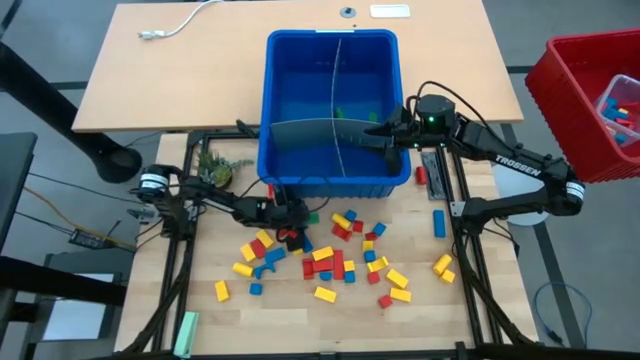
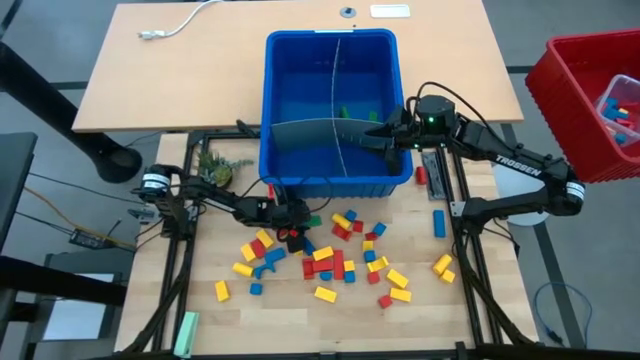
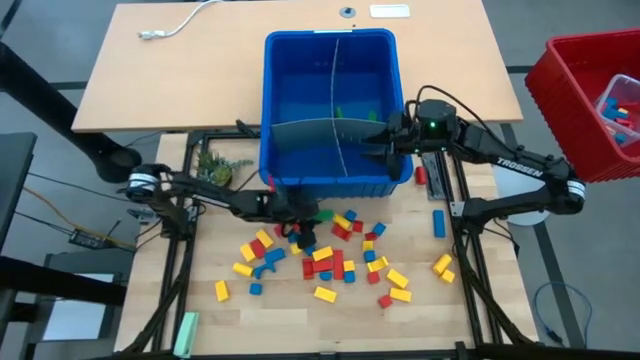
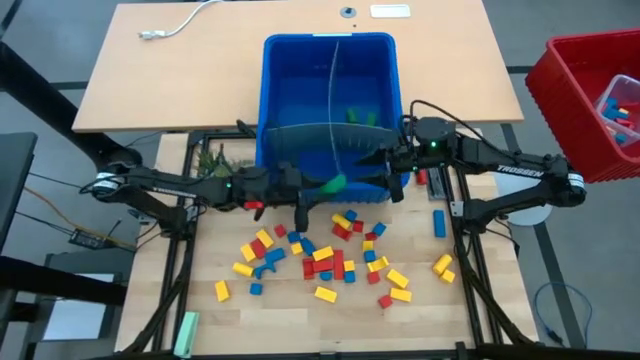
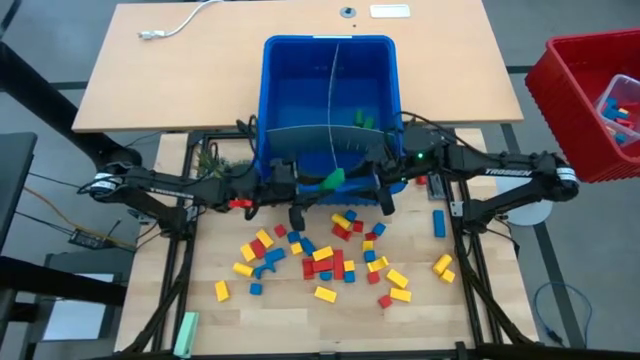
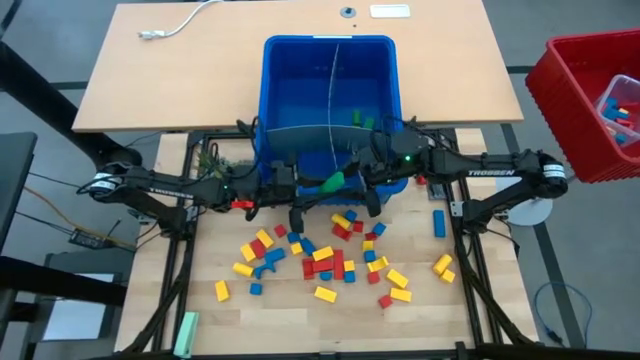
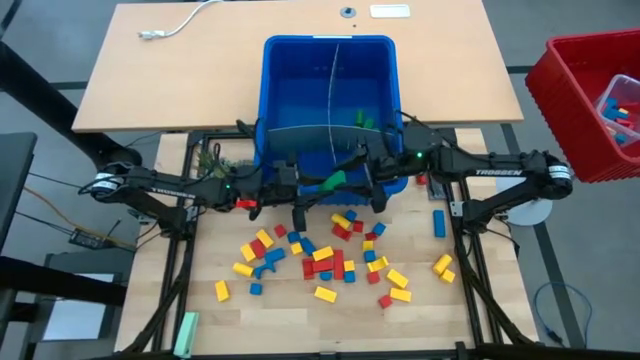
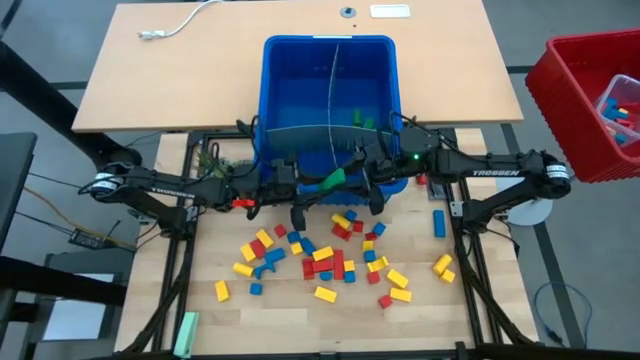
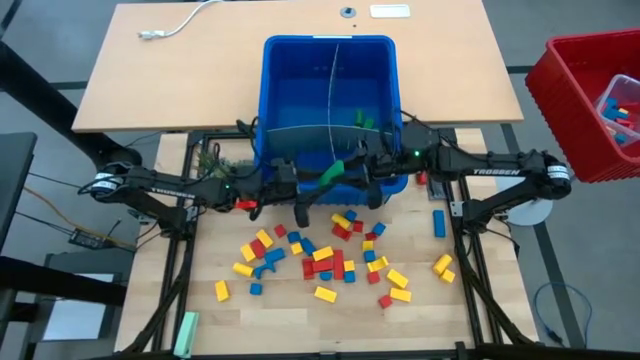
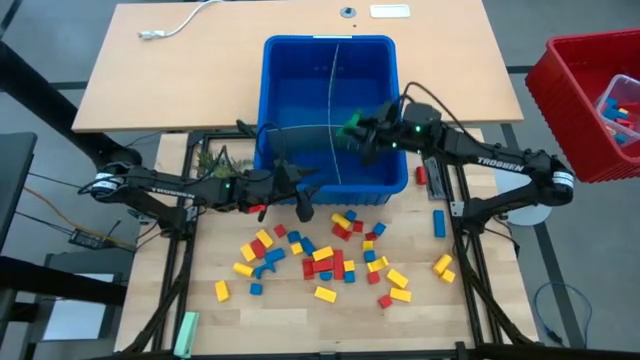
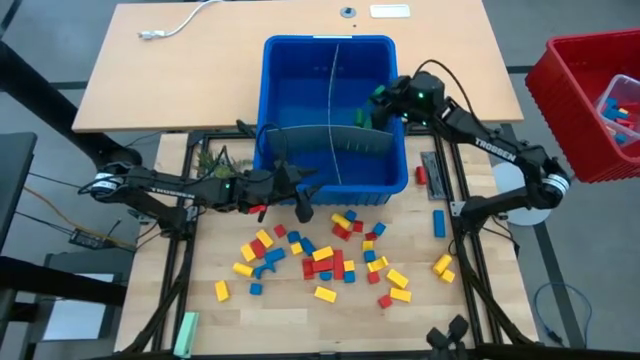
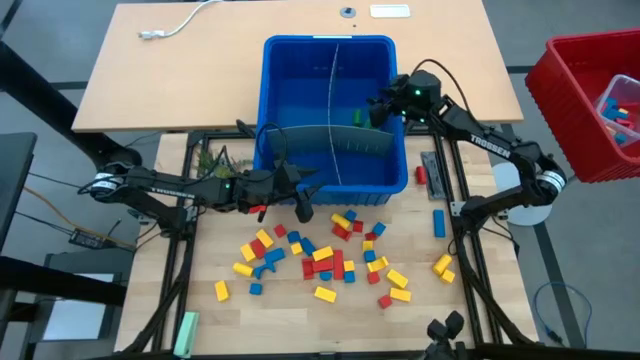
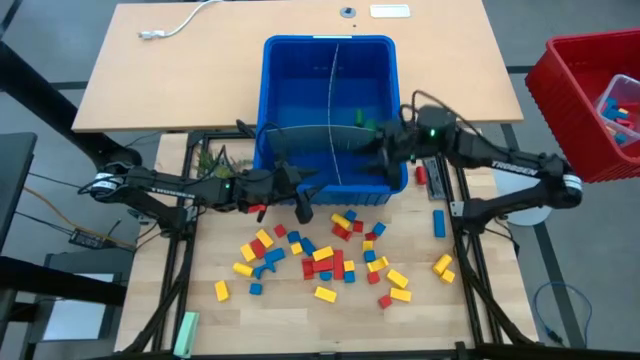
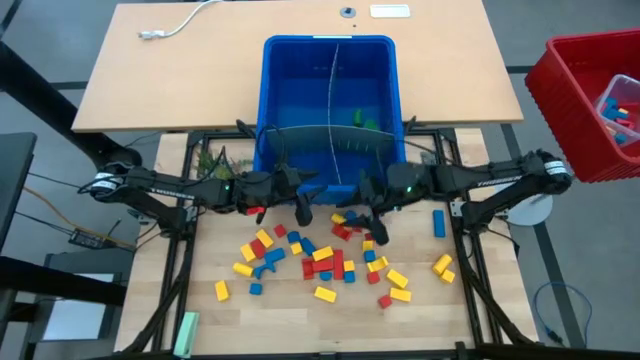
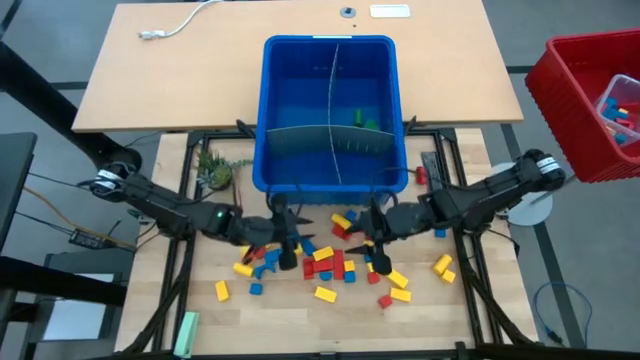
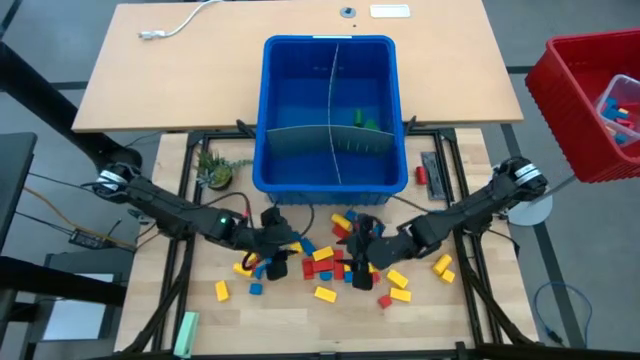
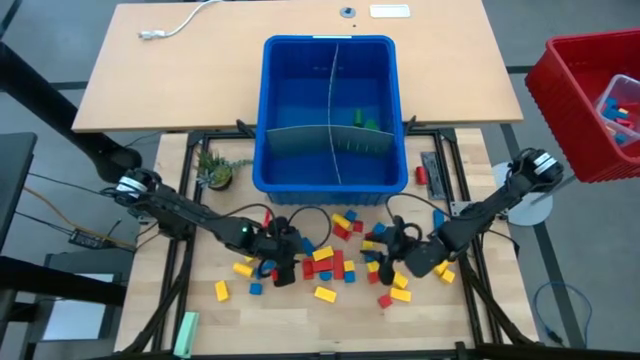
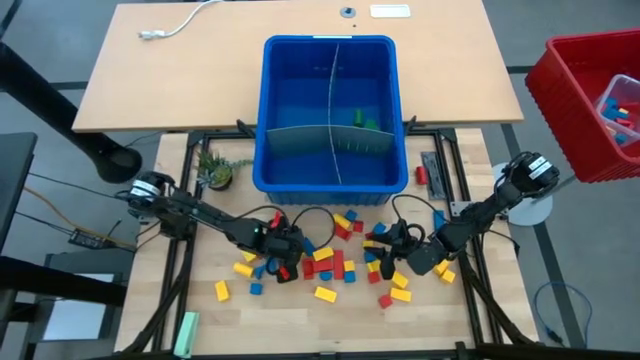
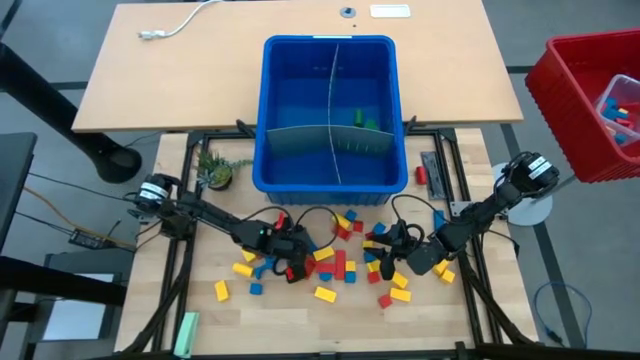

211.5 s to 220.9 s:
Task: Sort blocks
Put the green block with the other green blocks into the blue bin

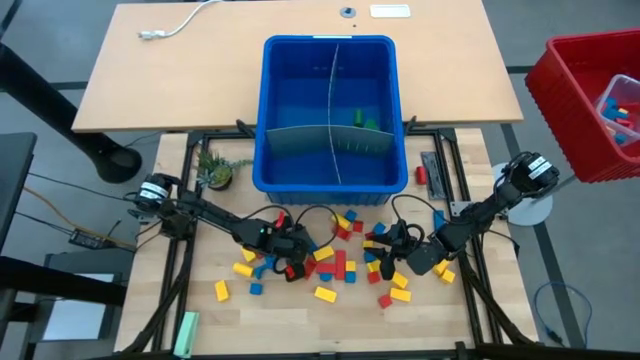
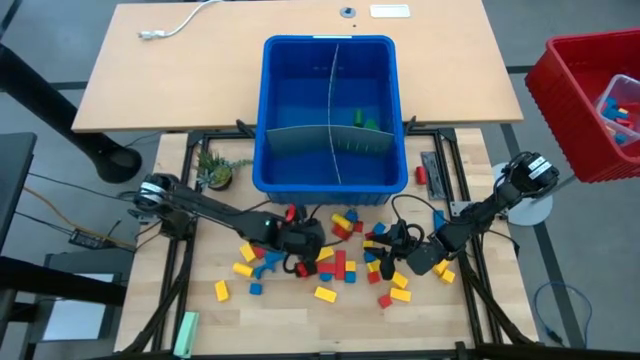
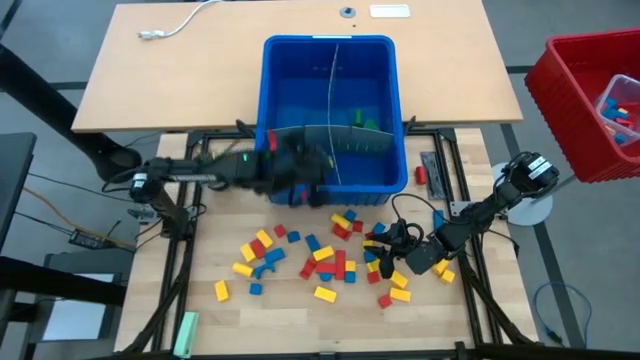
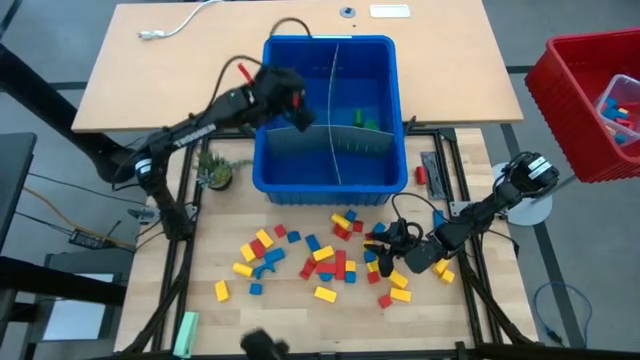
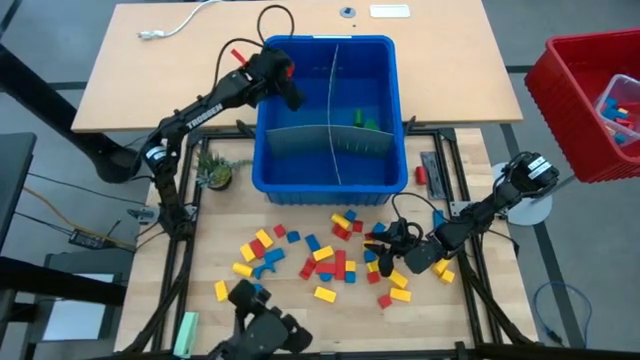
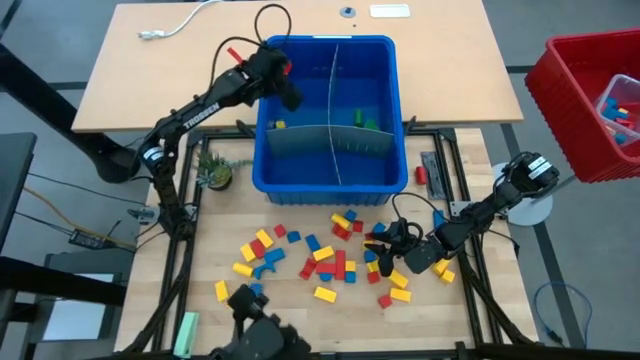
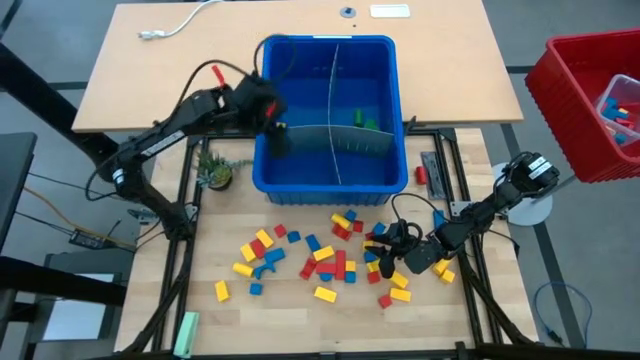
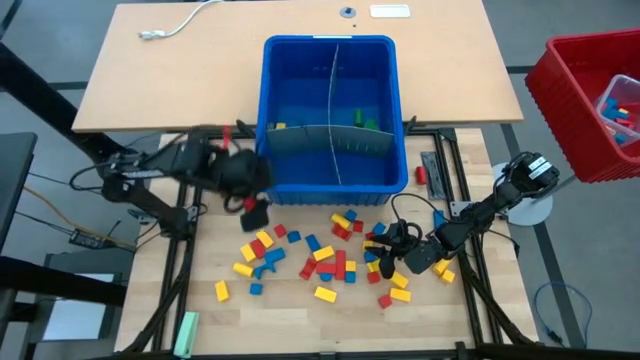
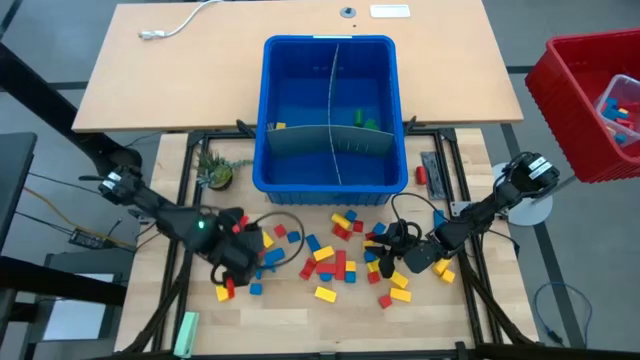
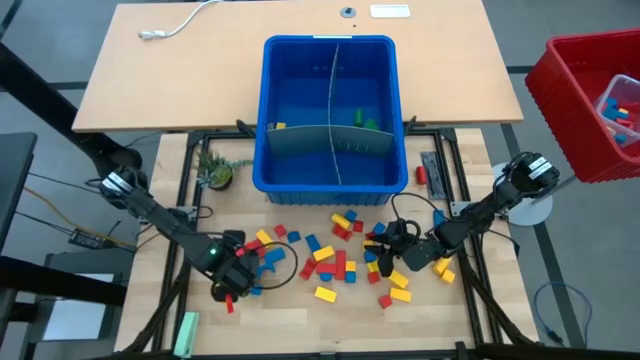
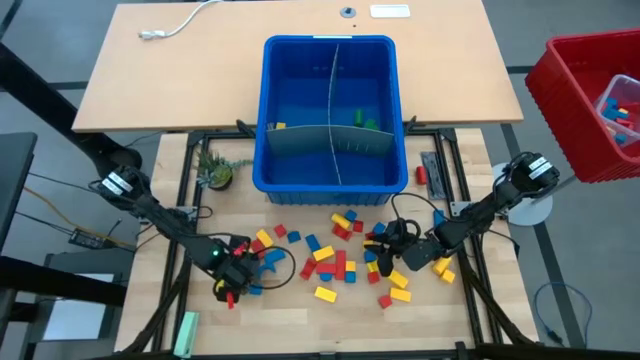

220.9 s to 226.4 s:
Put the green block with the other green blocks into the blue bin

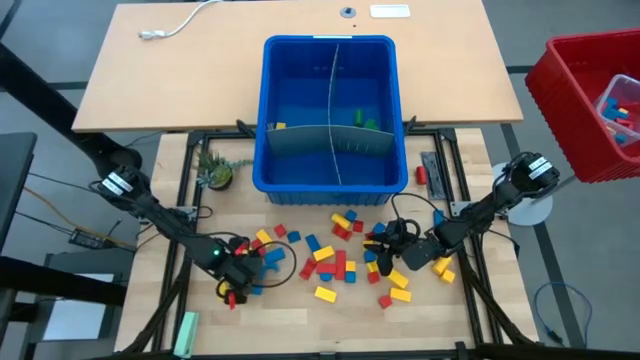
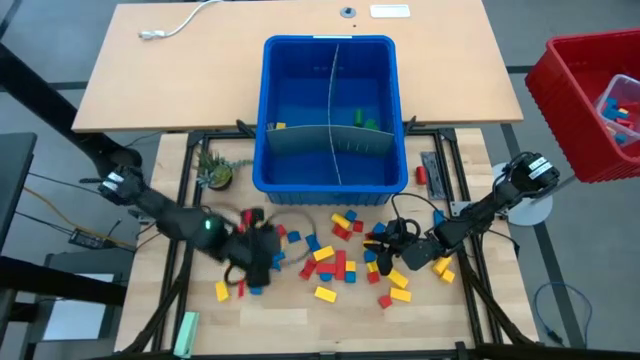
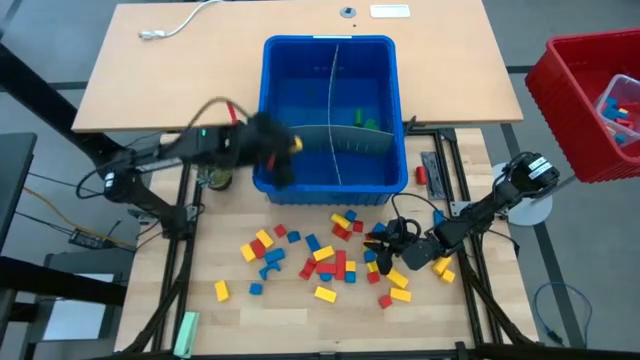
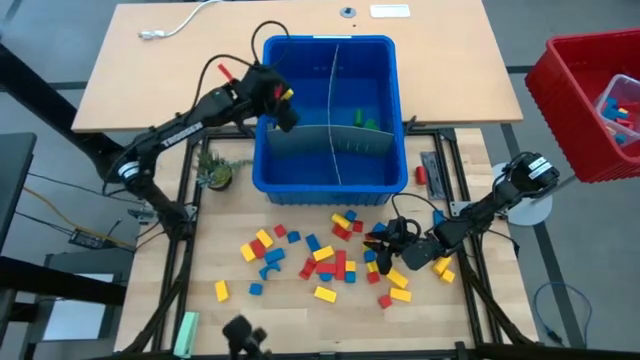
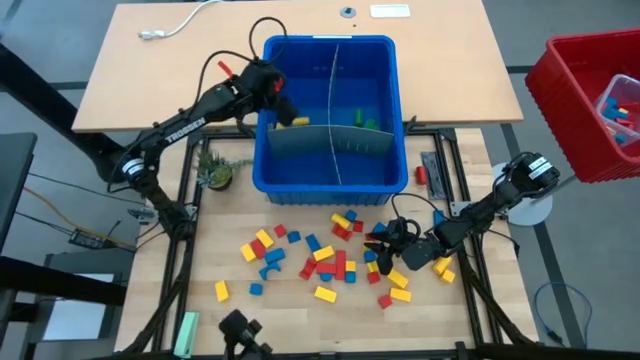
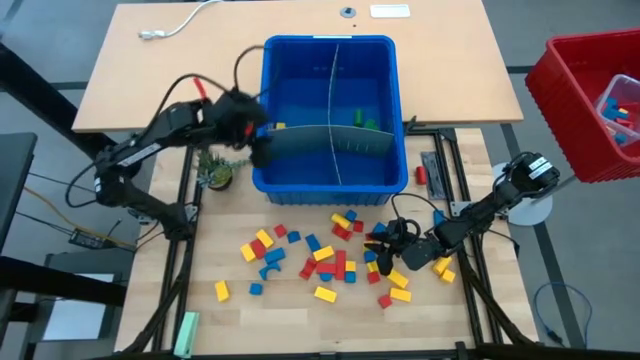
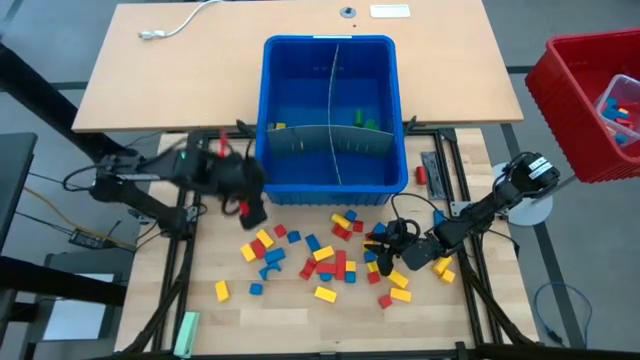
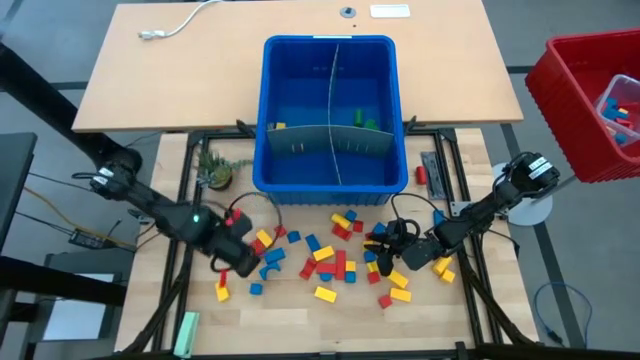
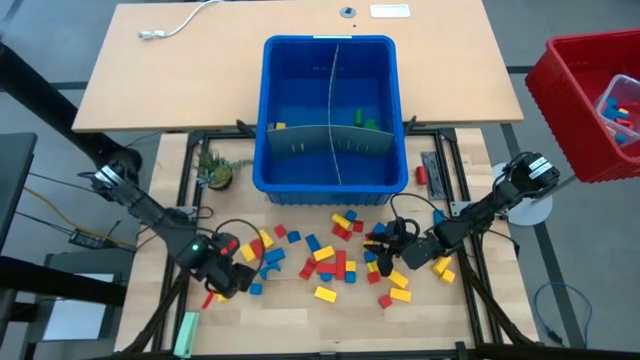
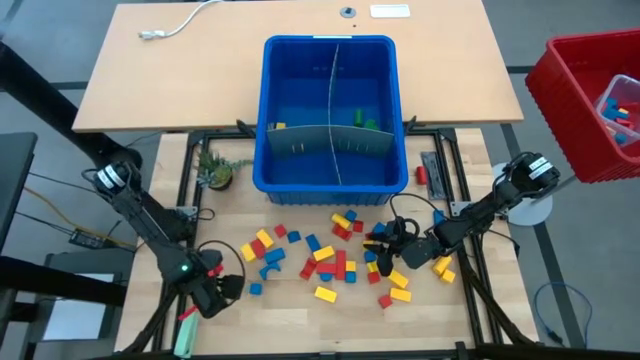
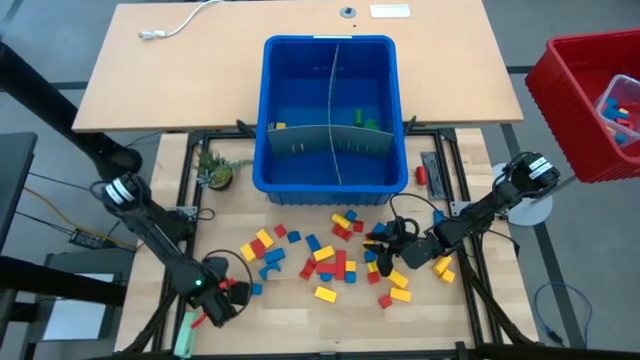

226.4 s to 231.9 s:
Put the yellow block into the blue bin
